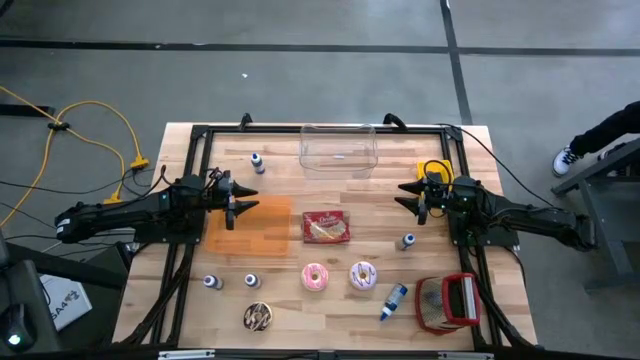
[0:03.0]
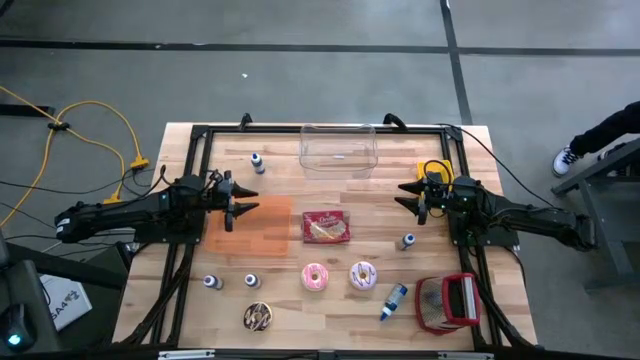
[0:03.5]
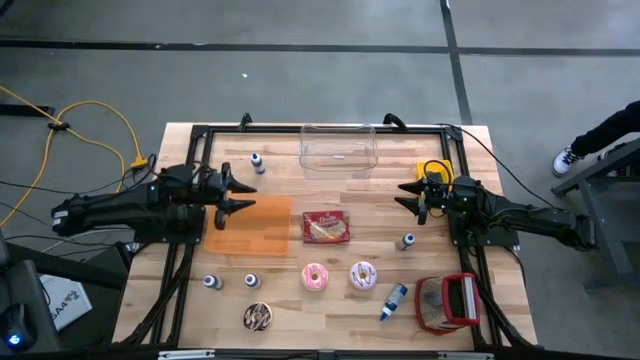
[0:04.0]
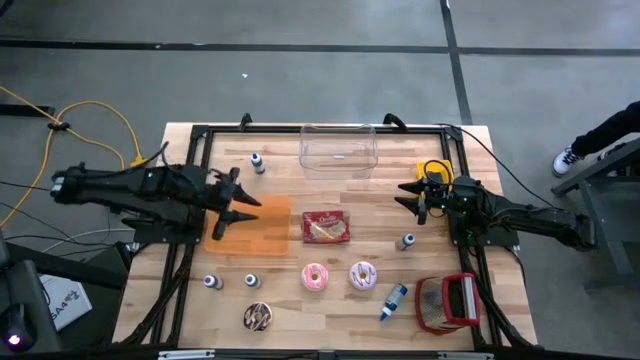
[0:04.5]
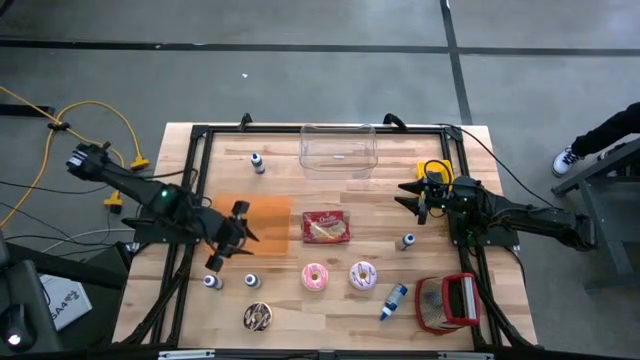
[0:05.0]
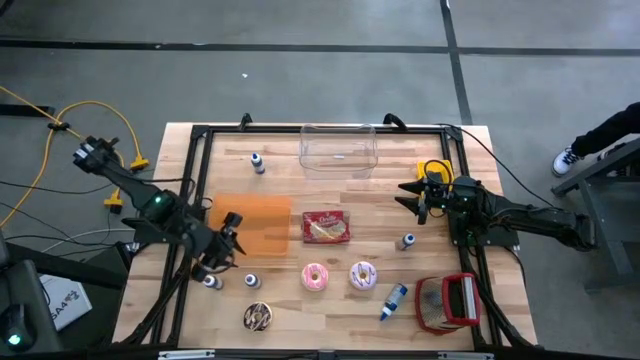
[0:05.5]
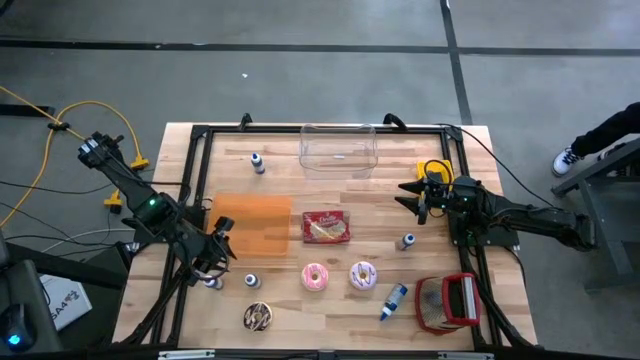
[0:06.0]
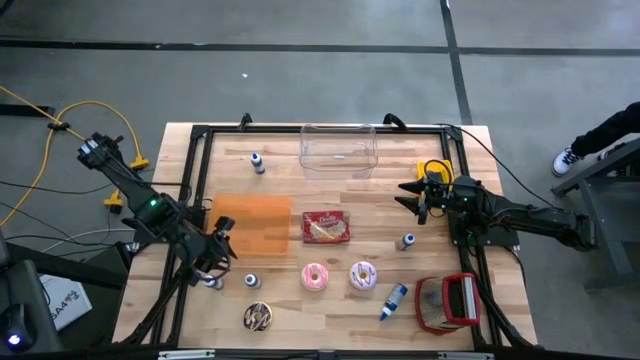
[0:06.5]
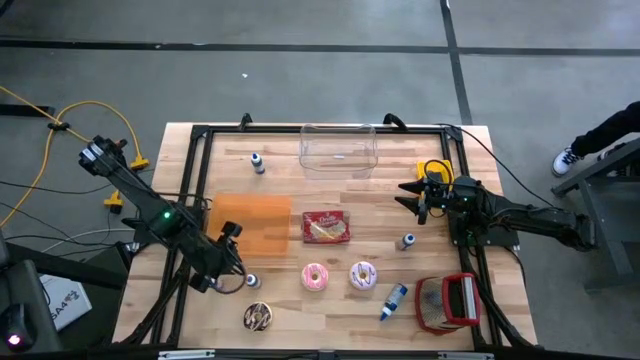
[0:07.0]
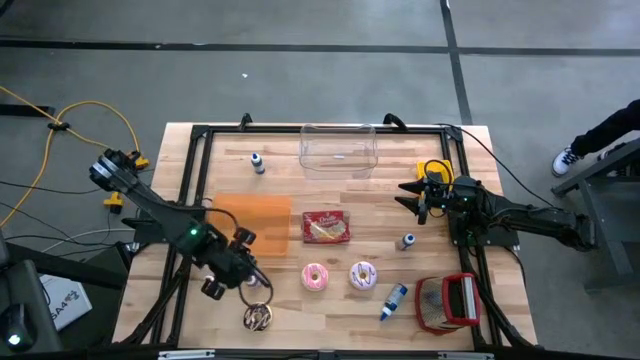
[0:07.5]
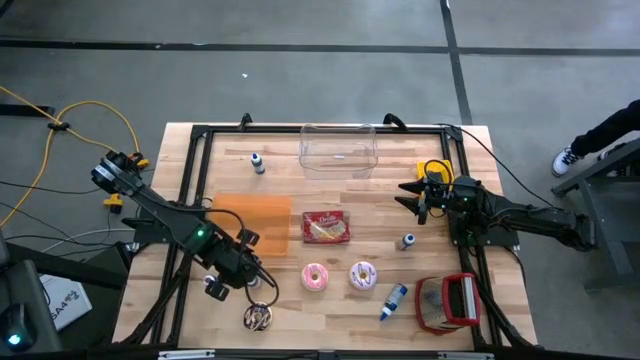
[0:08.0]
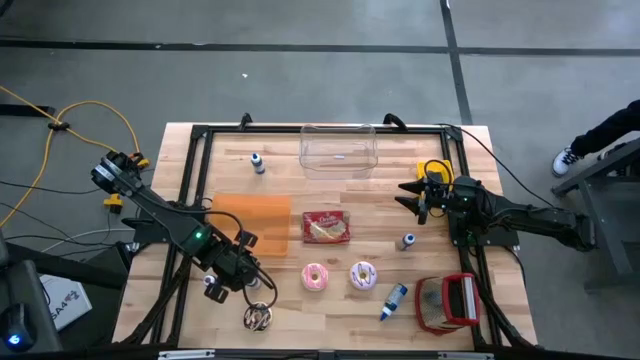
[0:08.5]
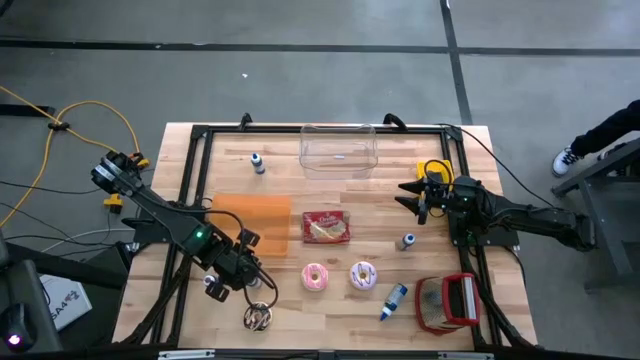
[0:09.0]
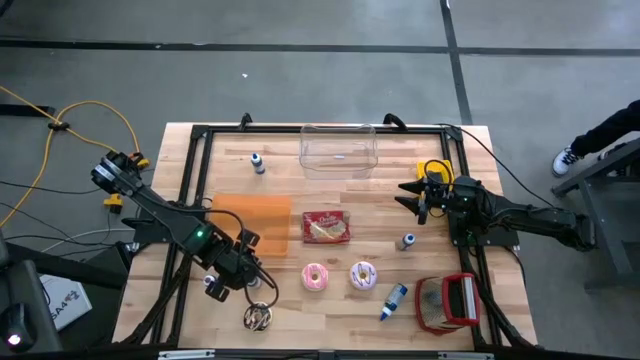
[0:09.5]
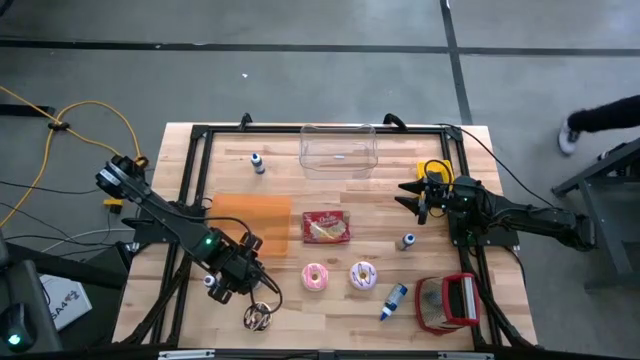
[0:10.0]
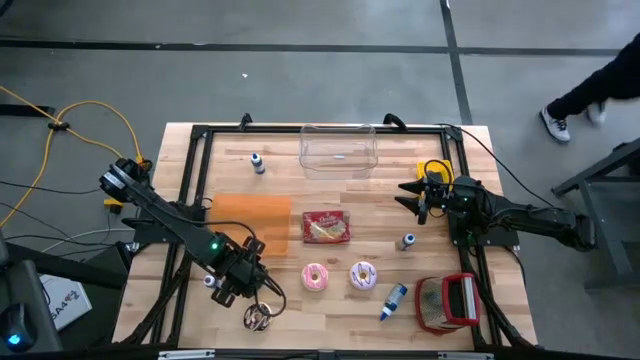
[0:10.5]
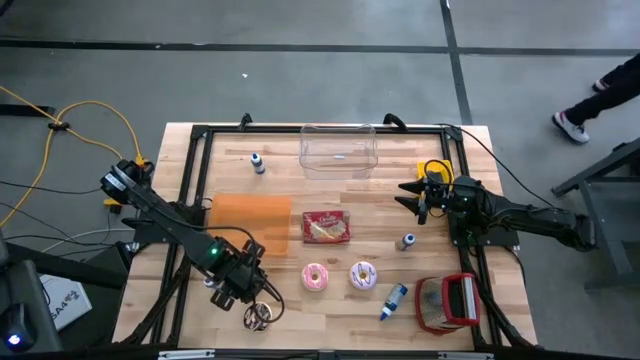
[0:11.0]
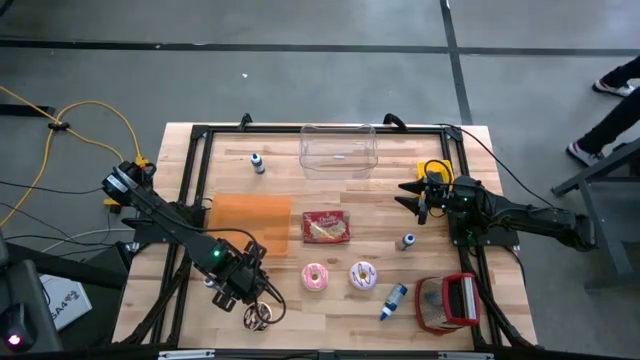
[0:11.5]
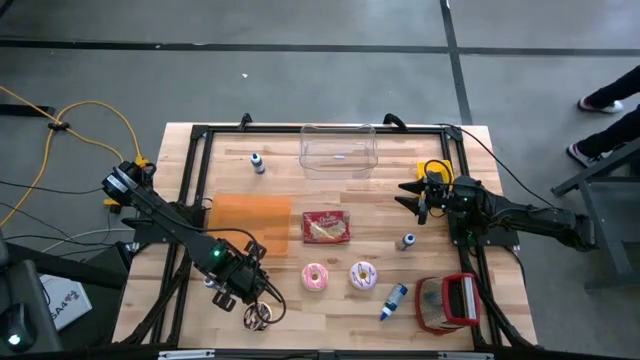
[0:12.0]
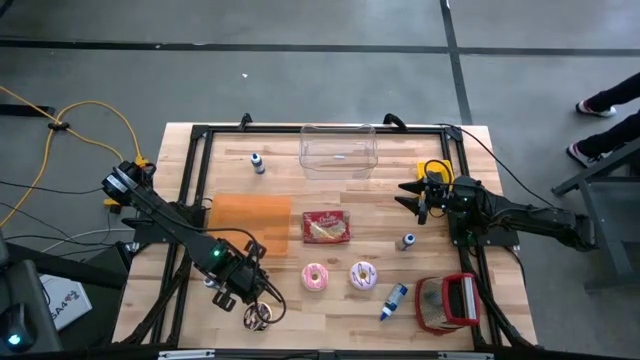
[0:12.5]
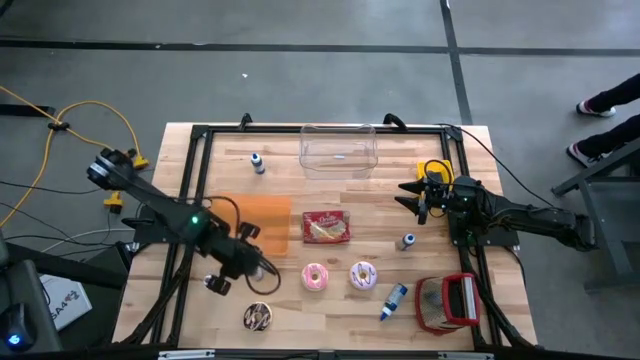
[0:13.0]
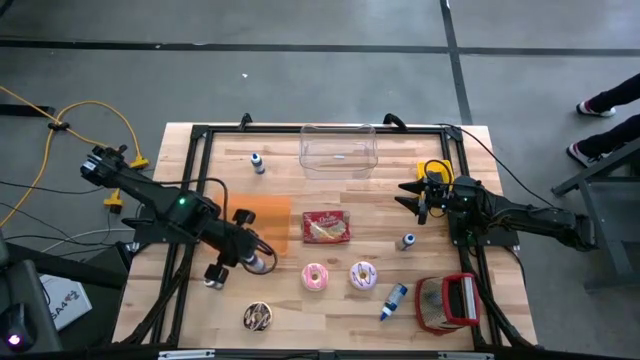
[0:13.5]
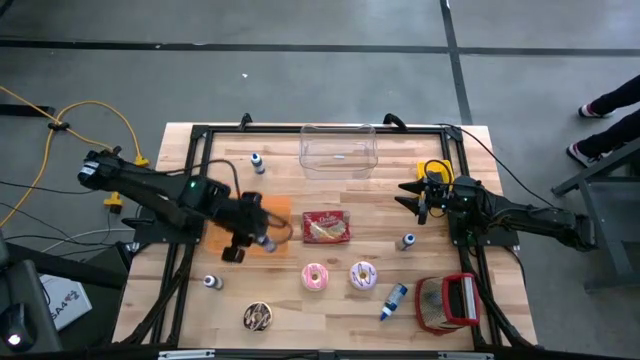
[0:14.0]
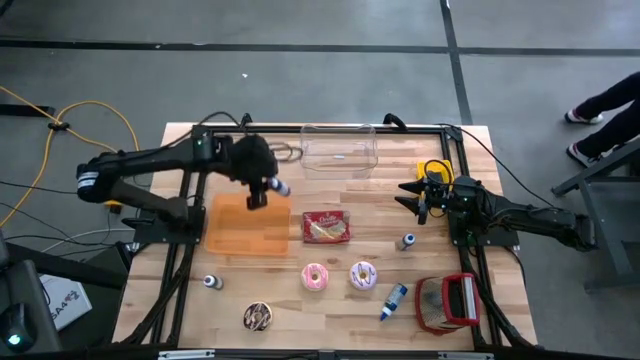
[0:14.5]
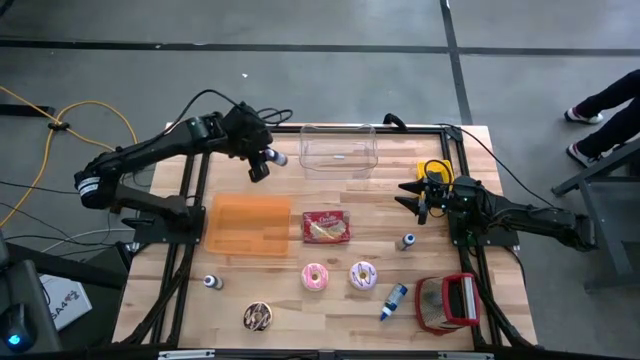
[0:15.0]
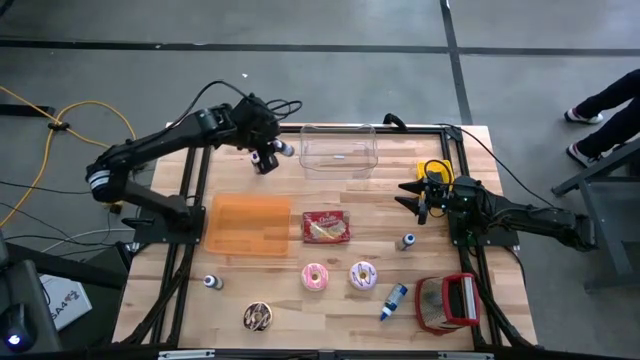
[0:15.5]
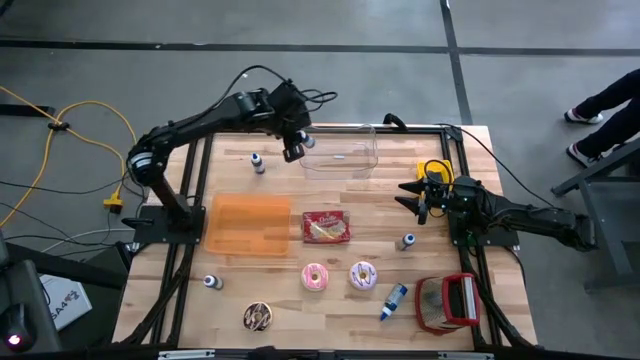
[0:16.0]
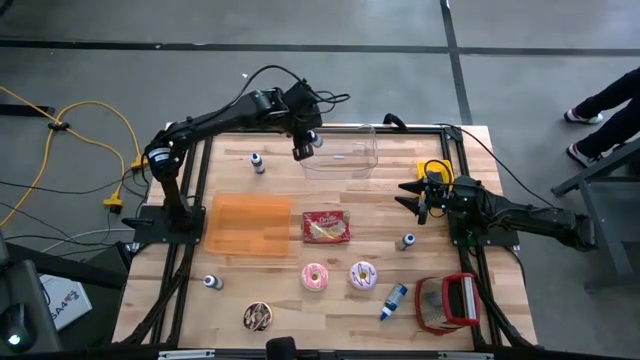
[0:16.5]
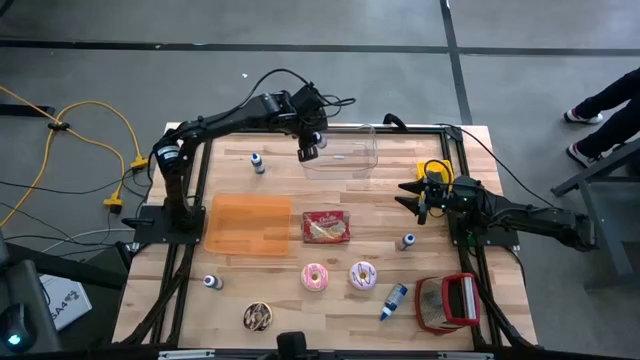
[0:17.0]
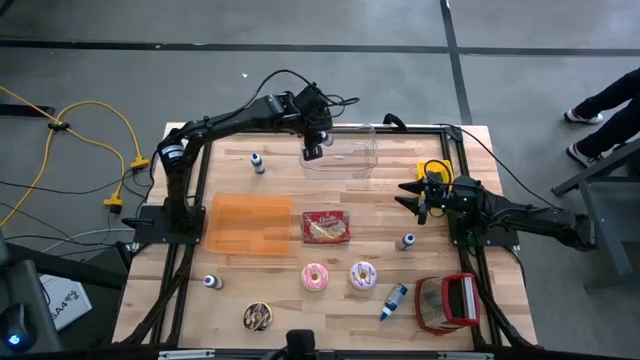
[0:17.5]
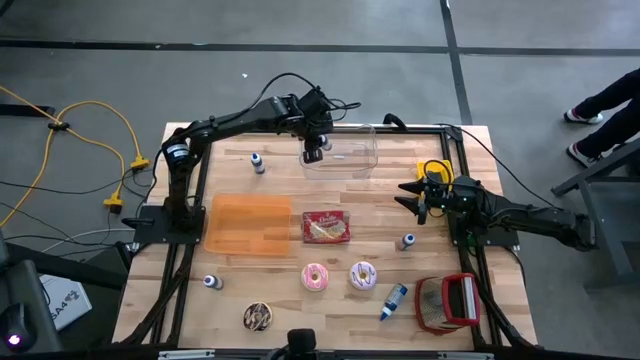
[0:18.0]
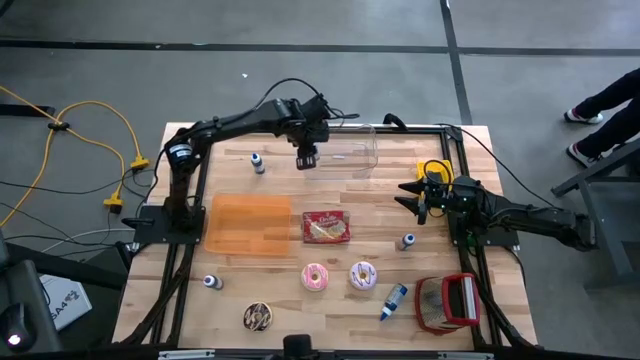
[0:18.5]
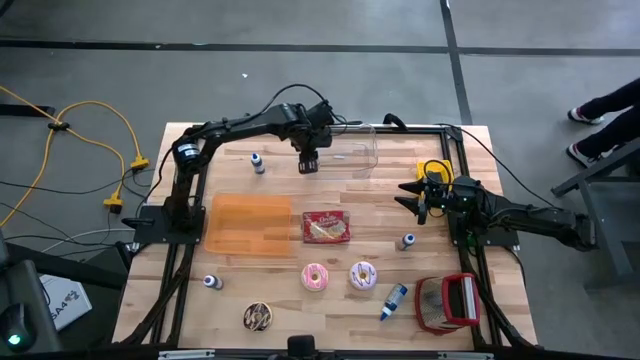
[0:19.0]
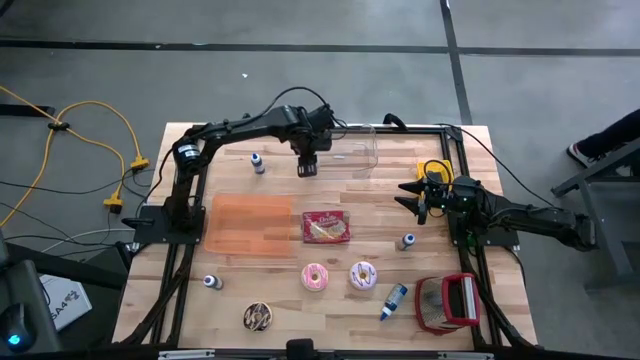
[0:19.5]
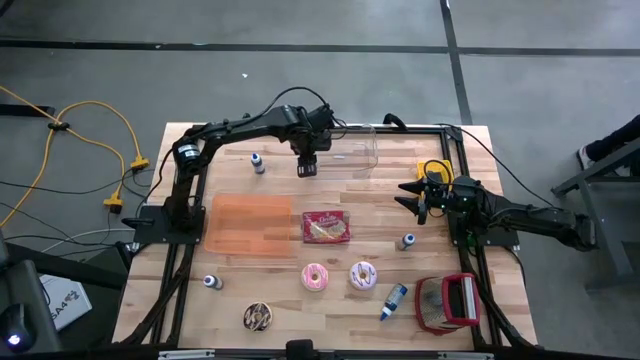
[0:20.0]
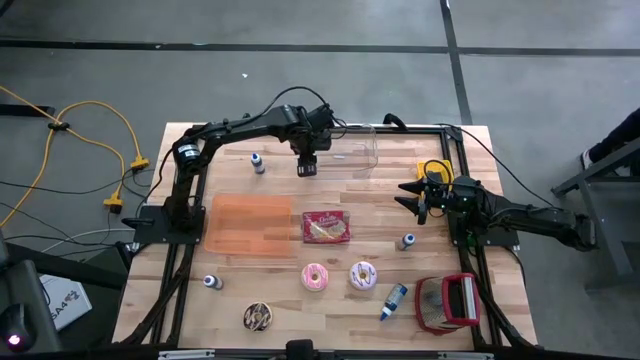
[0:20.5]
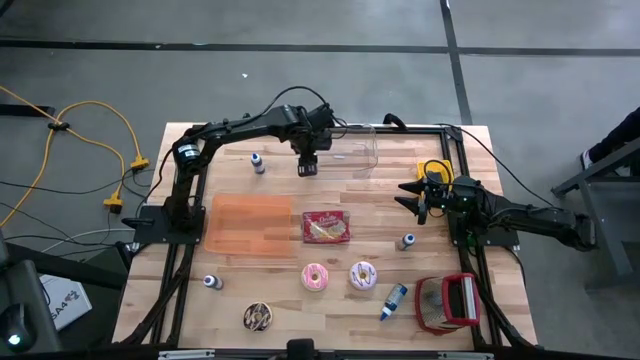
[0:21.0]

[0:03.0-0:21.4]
Put the left violet food coloring bottle into the transparent bin

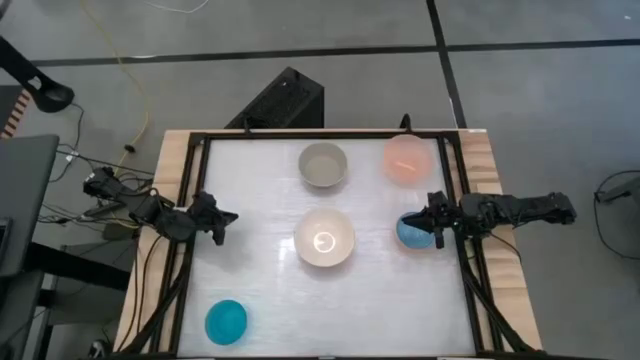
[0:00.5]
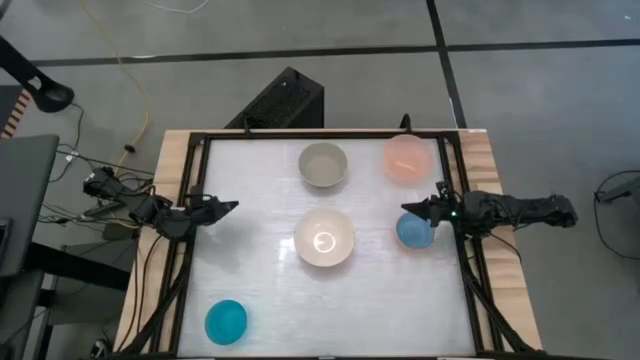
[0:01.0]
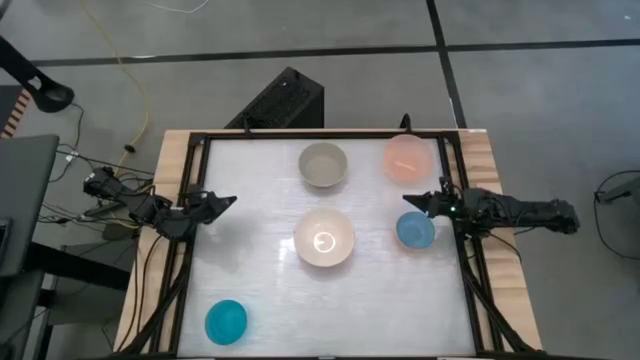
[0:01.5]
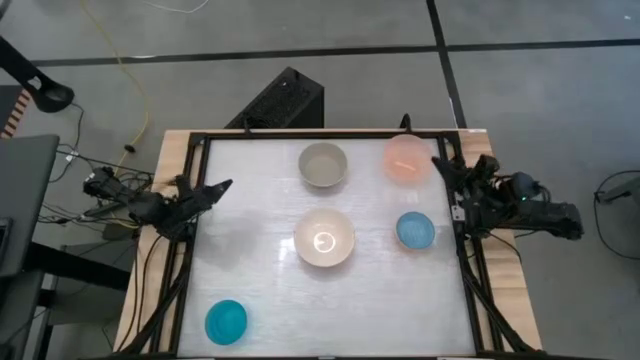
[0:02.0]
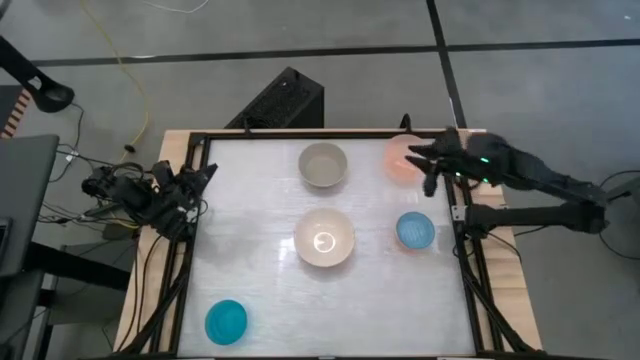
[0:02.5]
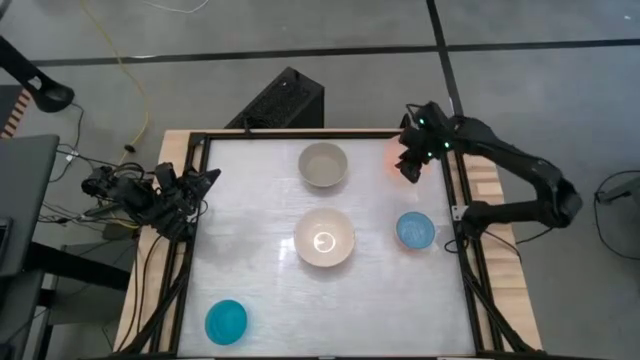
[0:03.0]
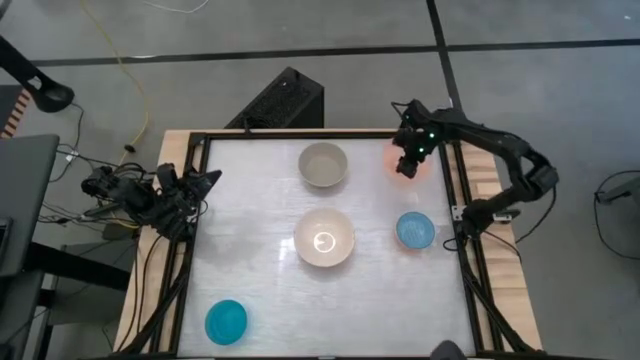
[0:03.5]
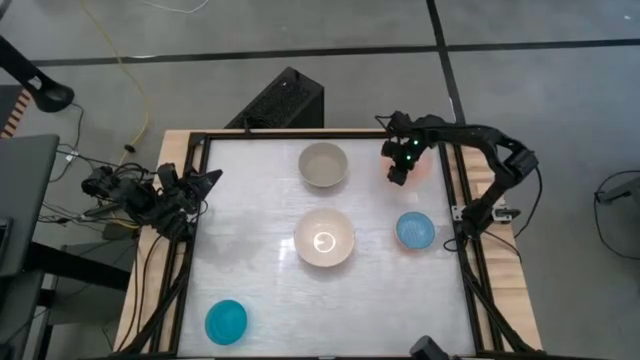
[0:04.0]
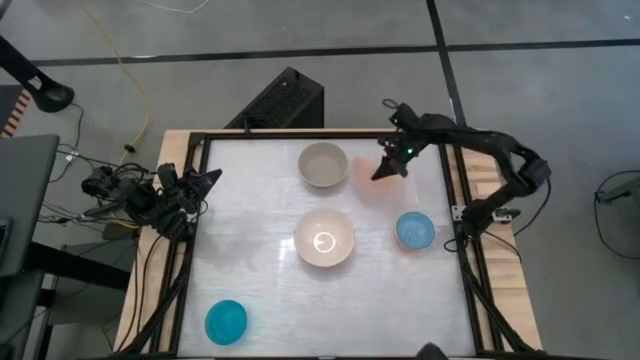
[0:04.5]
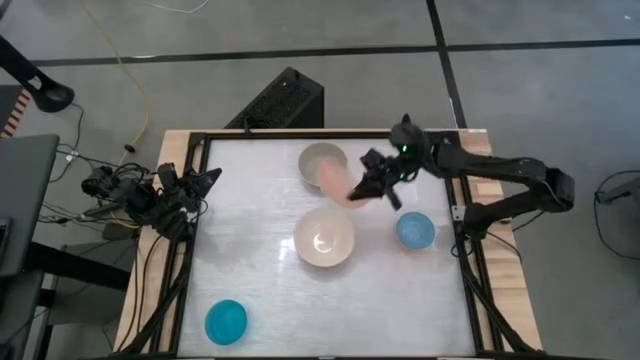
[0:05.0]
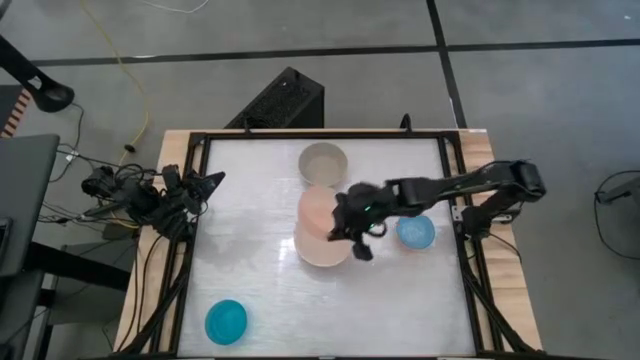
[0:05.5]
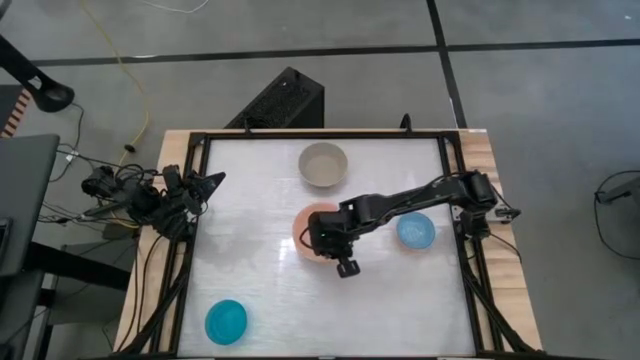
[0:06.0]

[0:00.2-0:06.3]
Stack the light orange bowl on top of the white bowl
